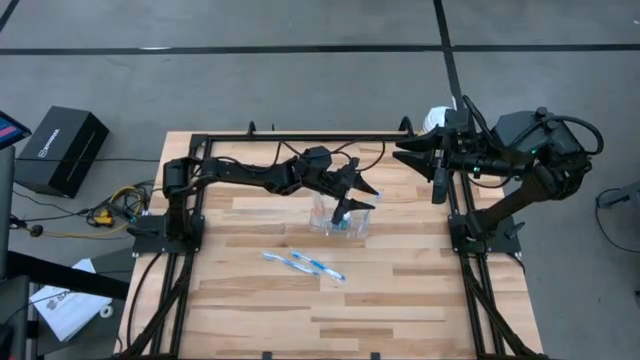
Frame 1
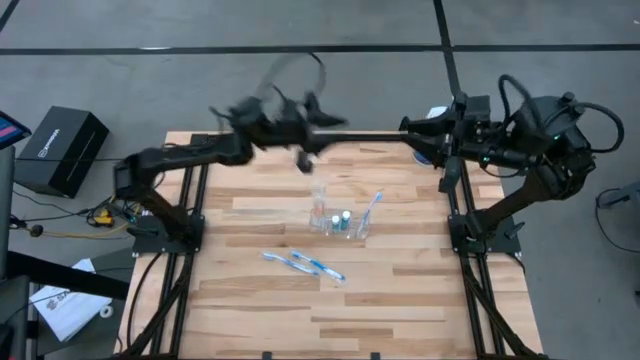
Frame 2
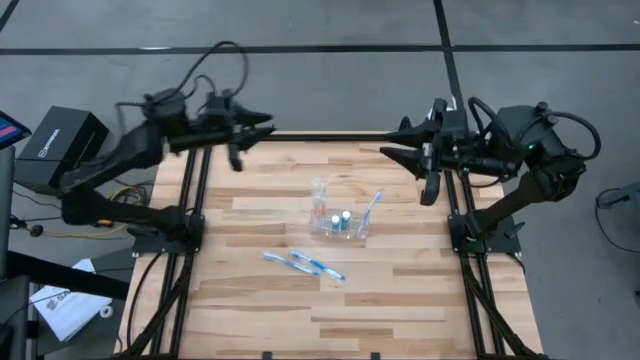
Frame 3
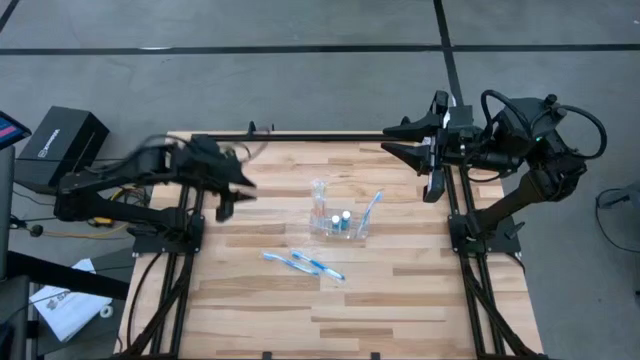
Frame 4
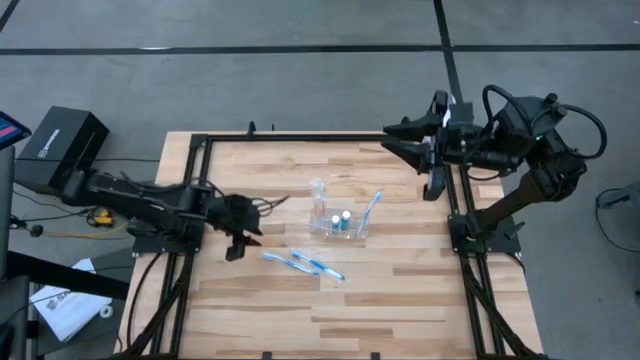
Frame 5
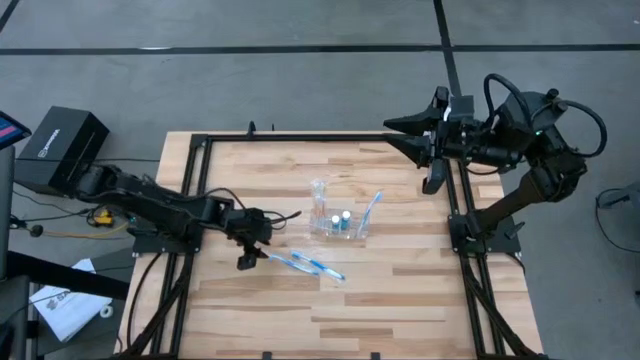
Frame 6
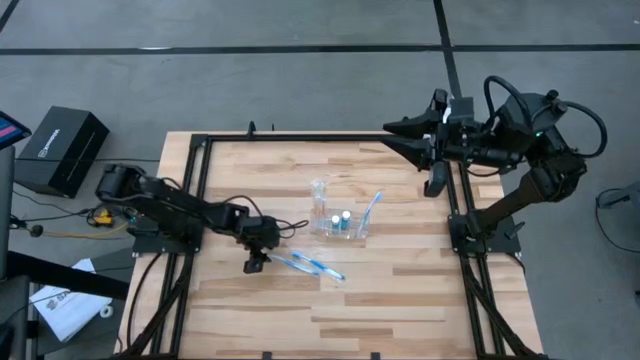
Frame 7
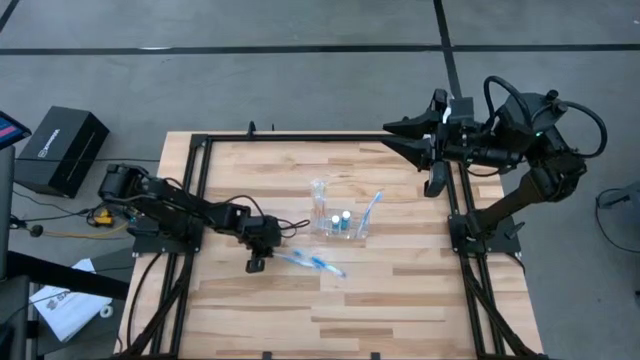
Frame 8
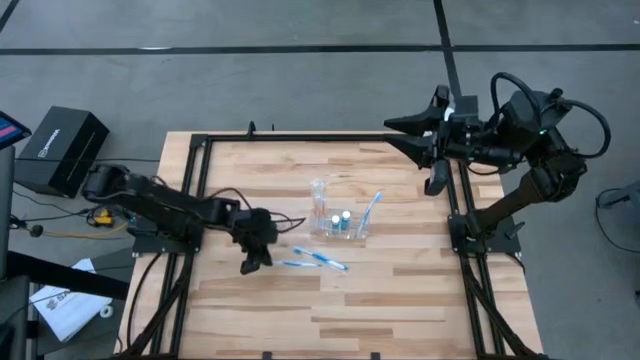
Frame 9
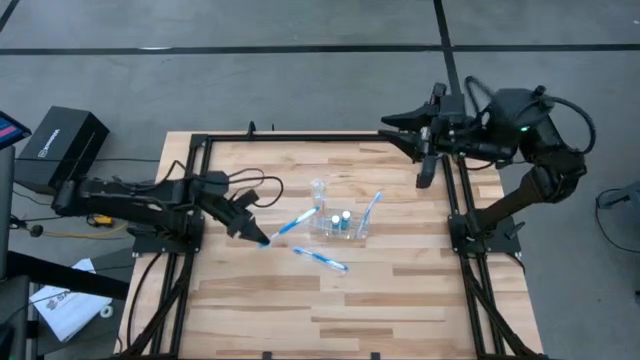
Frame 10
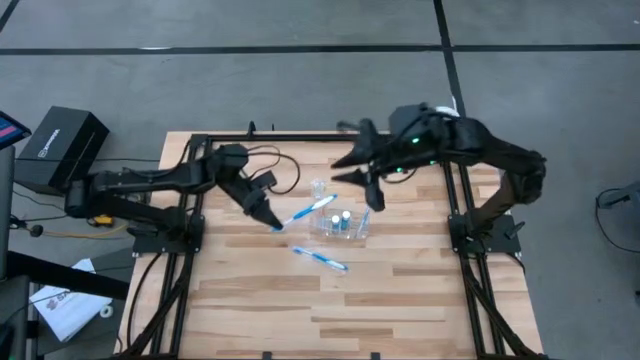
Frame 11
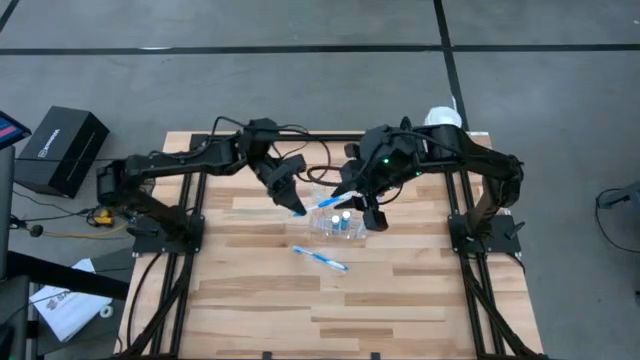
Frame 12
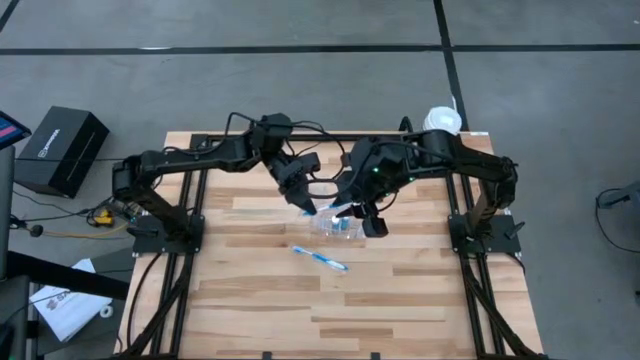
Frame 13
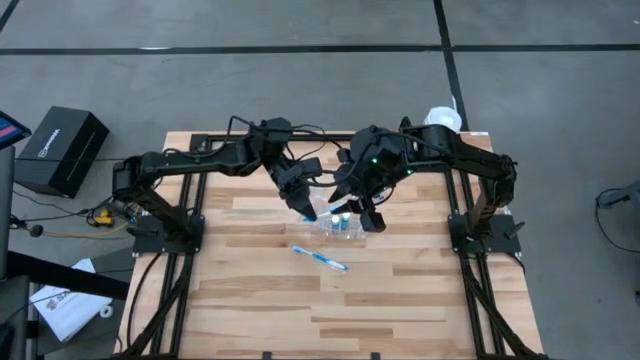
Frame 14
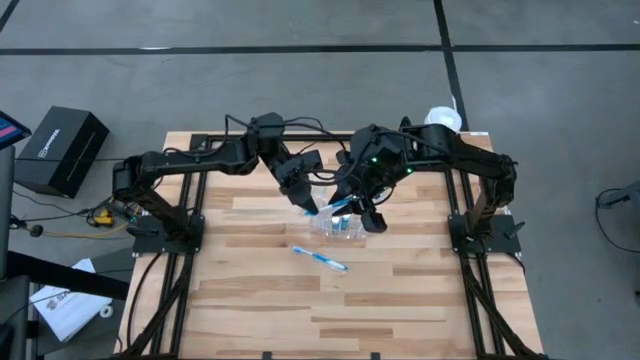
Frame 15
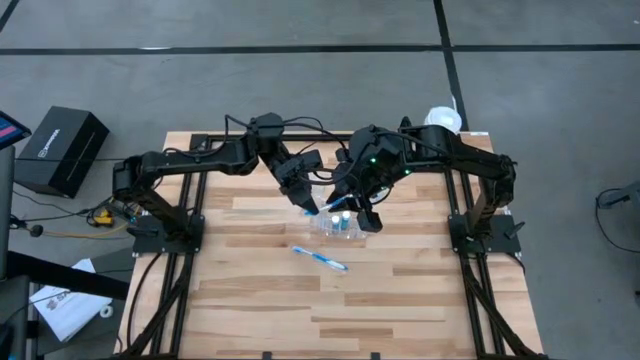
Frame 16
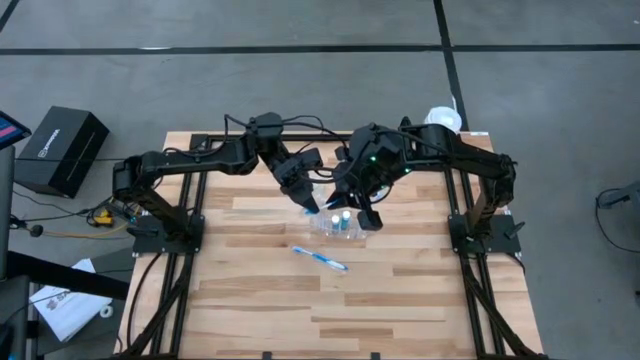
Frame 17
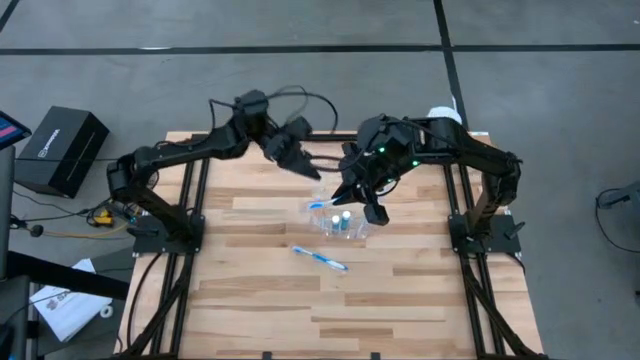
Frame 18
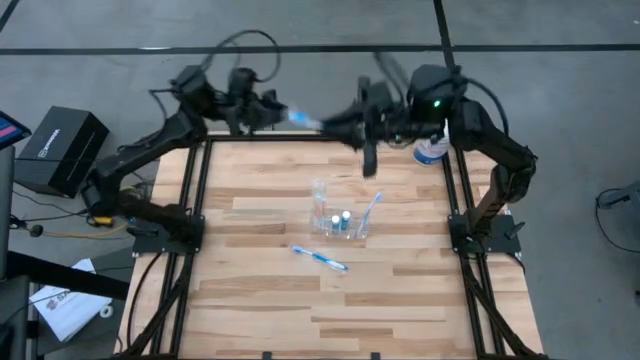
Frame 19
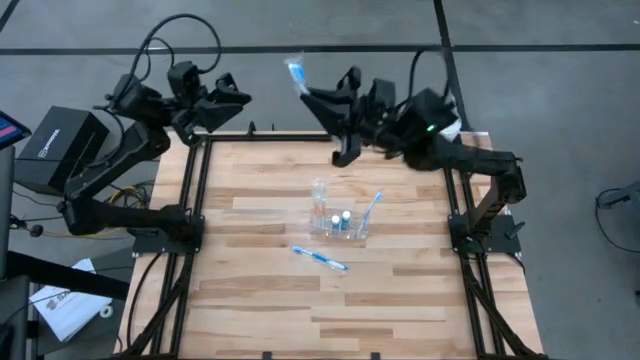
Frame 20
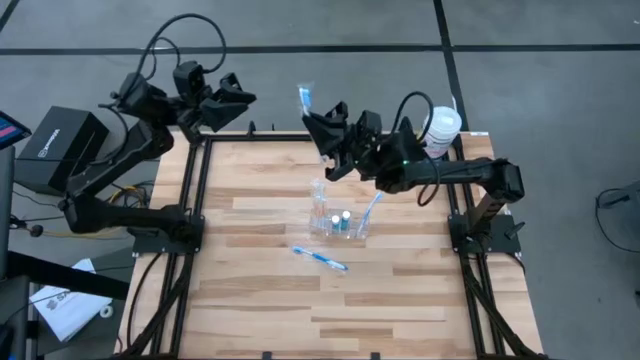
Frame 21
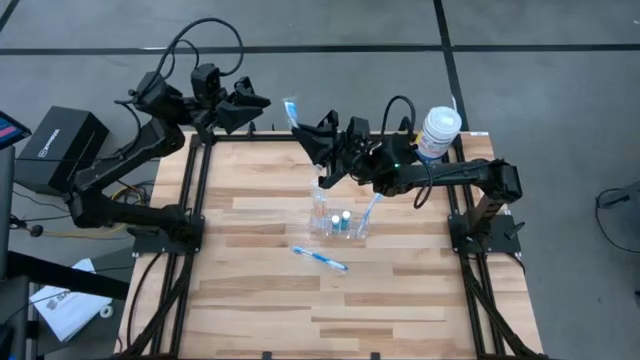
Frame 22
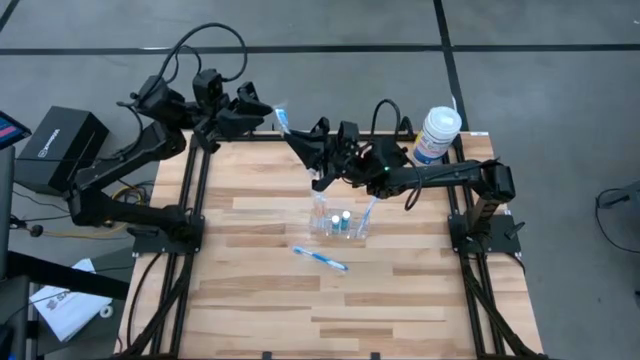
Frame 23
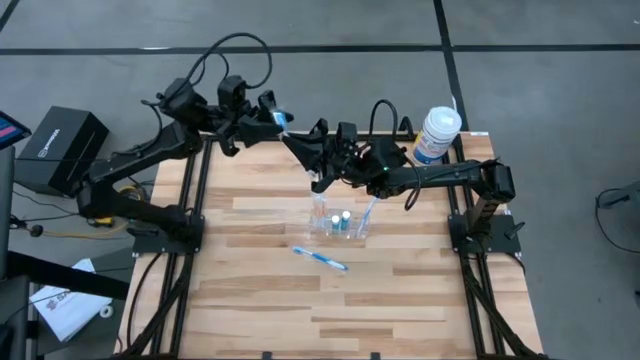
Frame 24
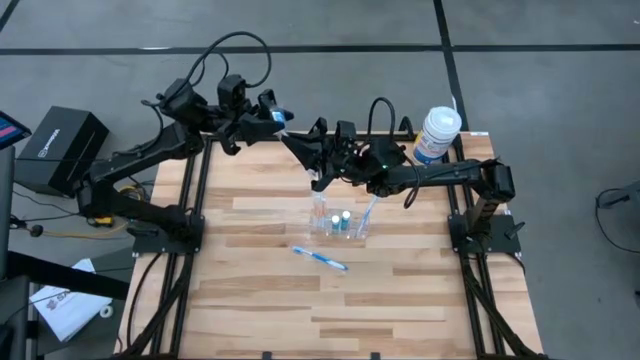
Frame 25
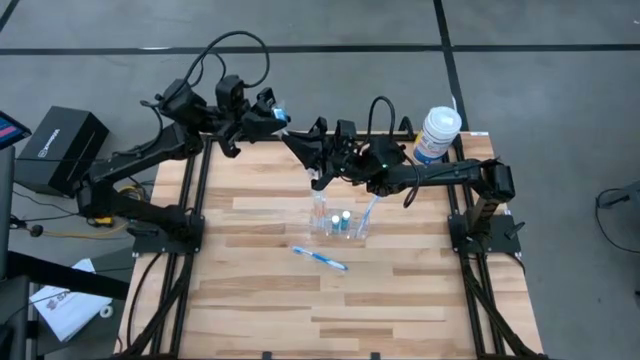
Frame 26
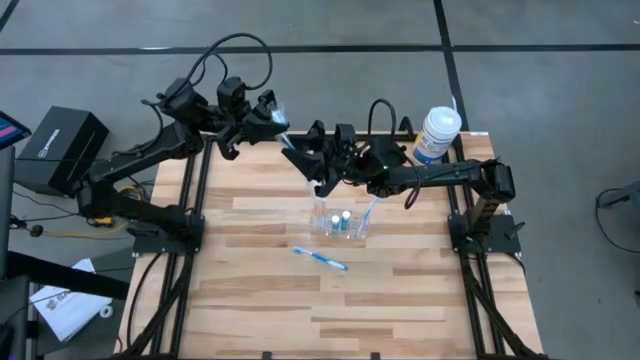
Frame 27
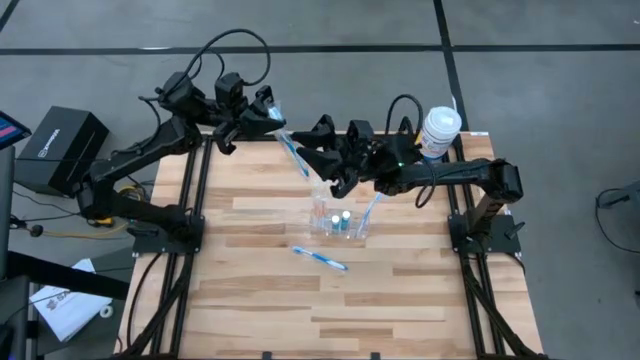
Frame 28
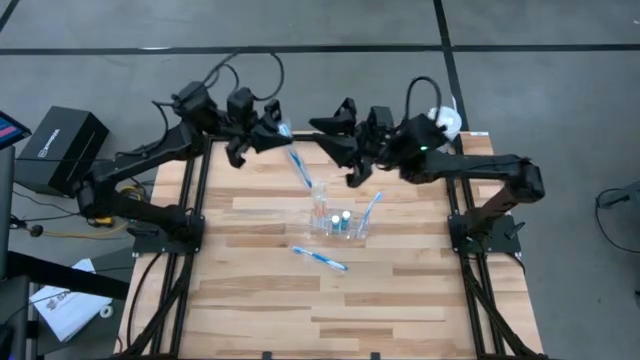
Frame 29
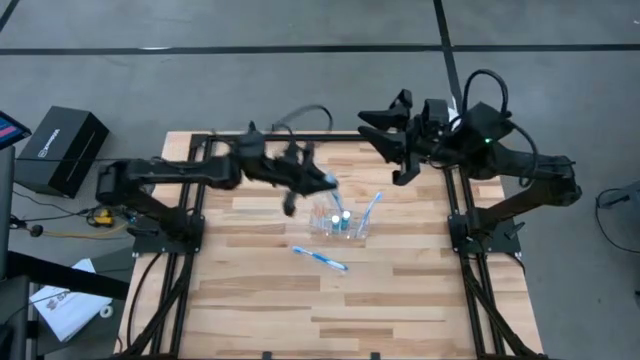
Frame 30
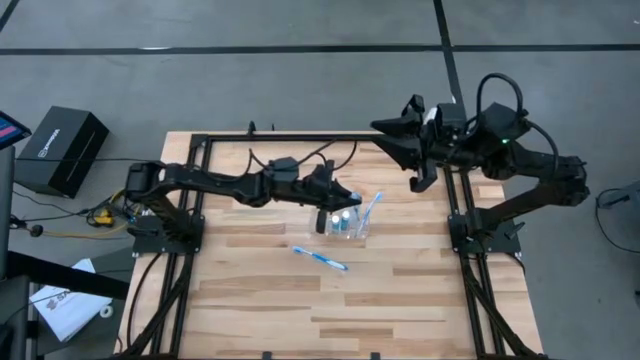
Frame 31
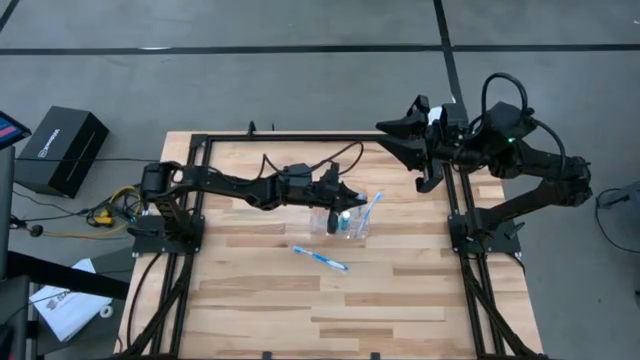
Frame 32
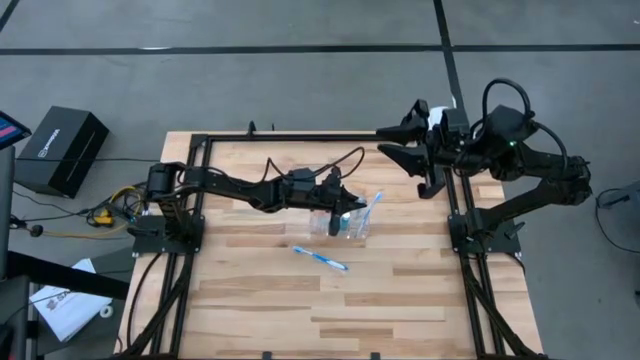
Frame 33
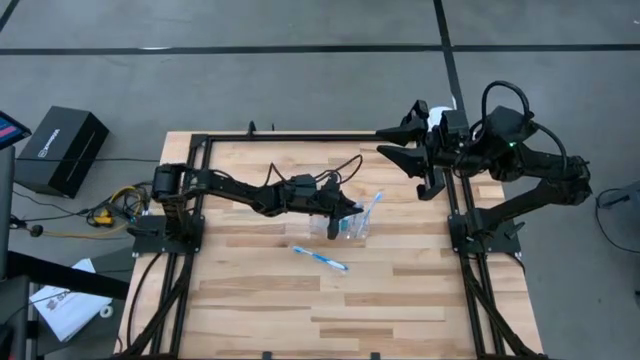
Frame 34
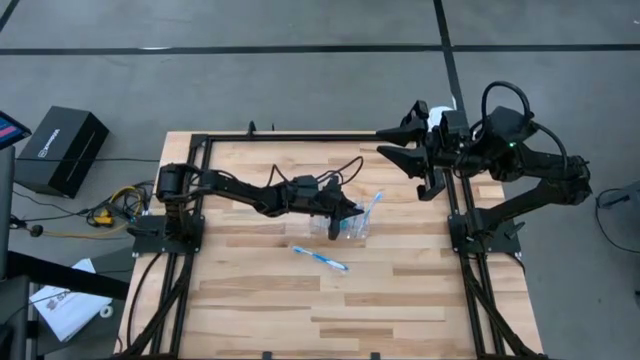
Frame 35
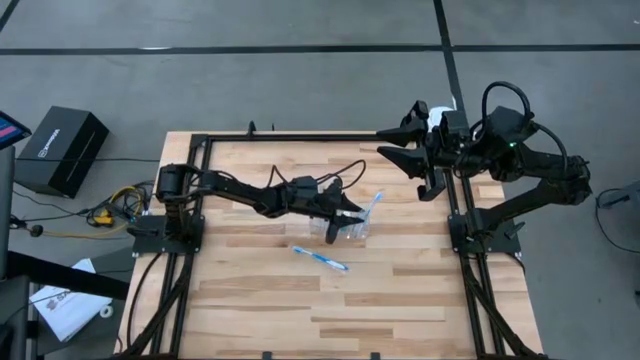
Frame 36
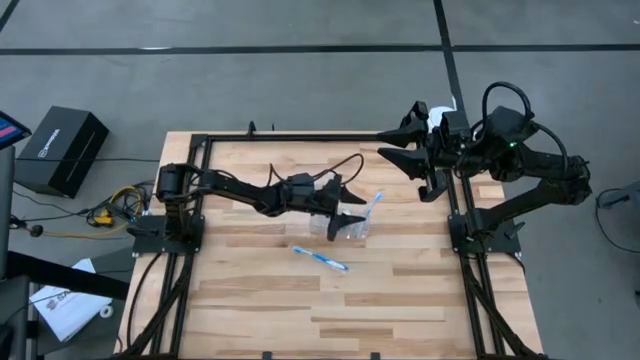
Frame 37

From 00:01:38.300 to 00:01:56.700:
Task: Pick & Place toothbrushing station
Put the left blue toothbrush into the transparent organizer

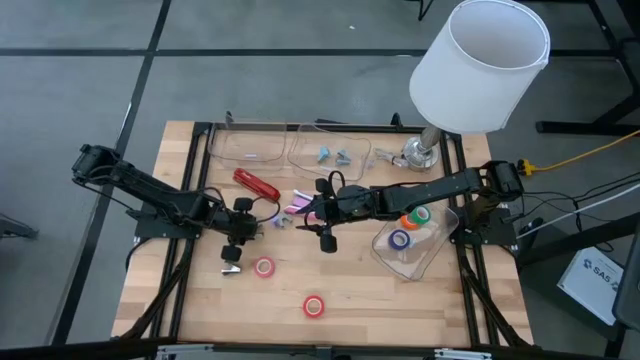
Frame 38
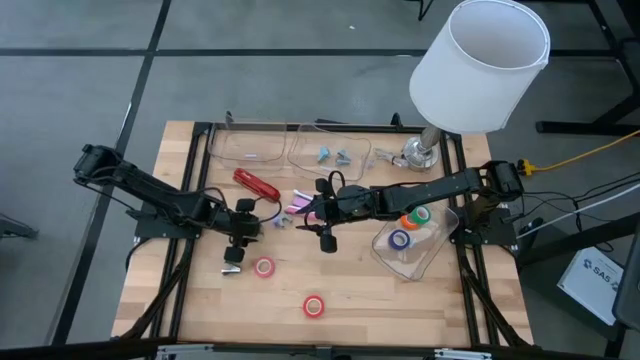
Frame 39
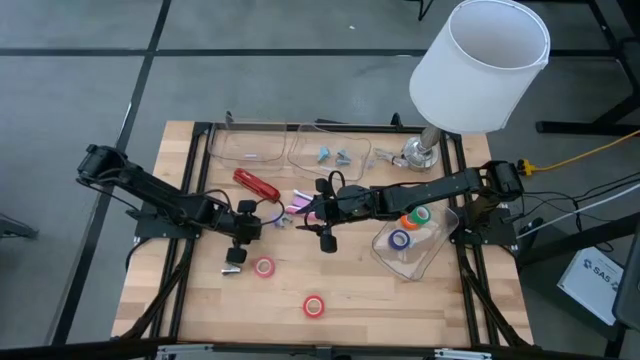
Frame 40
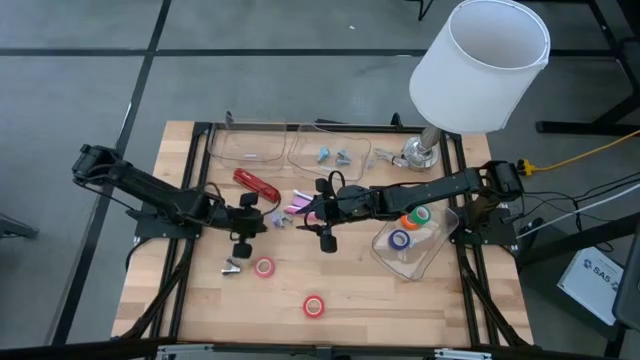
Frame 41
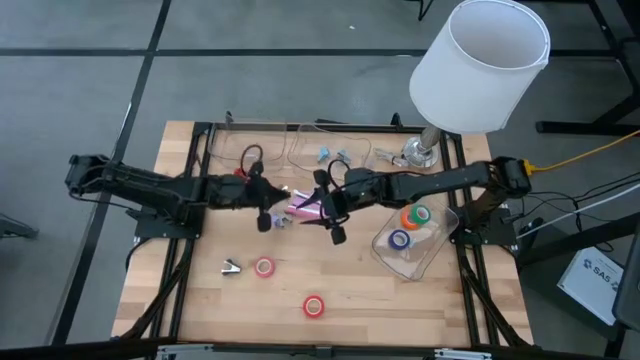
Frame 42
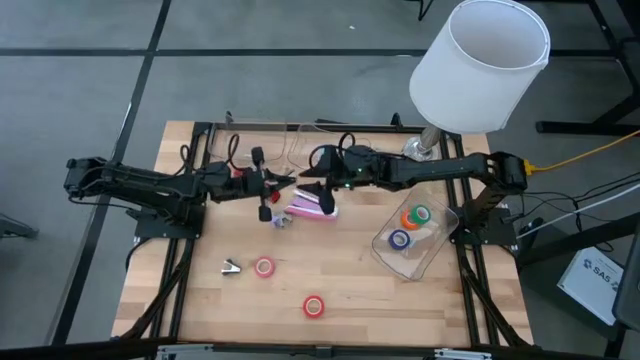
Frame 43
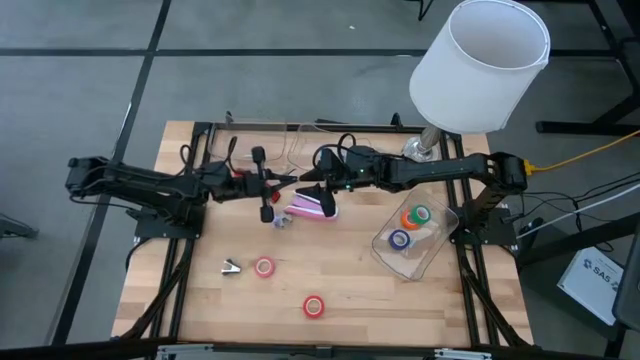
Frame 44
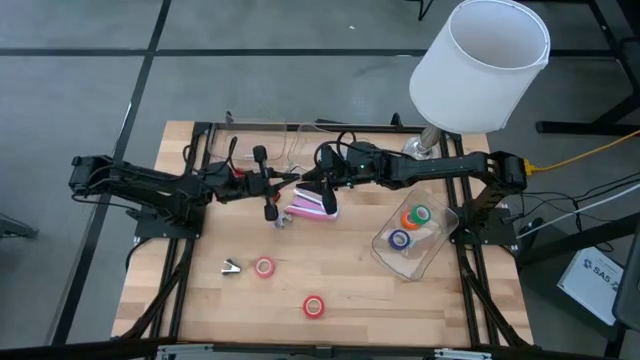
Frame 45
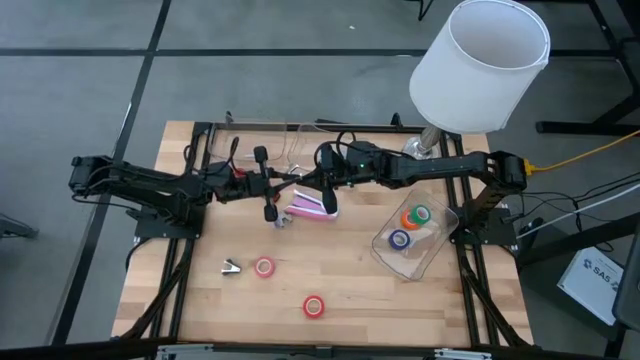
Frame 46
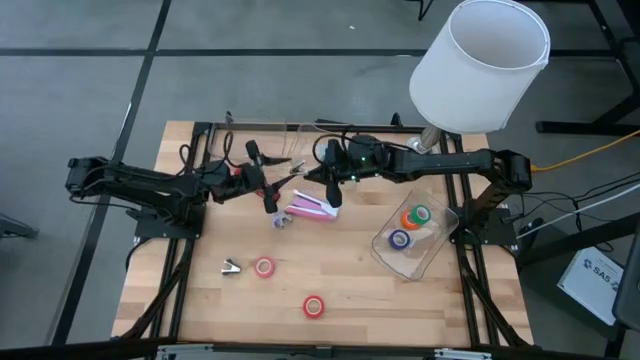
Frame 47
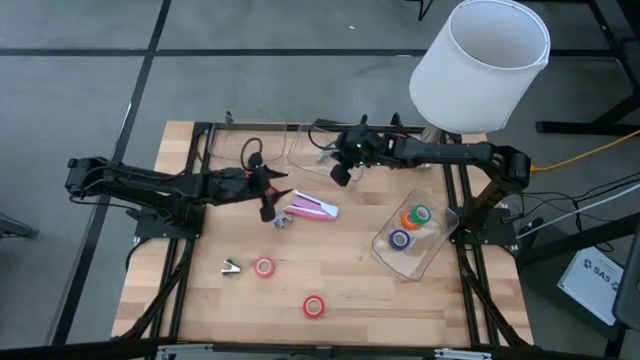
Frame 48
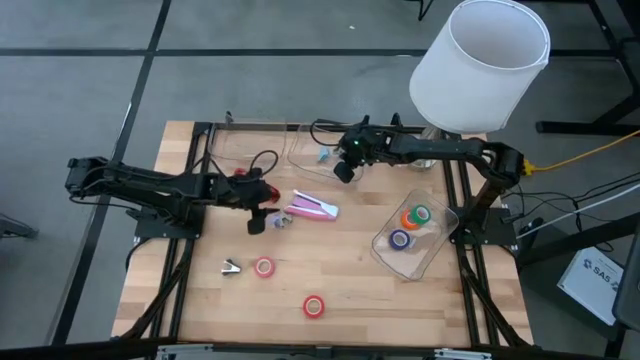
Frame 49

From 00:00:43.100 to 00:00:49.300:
Task: Pick and place Stapler, Stapler remover, tape
Put the left gray staple remover into the top right transparent bin
